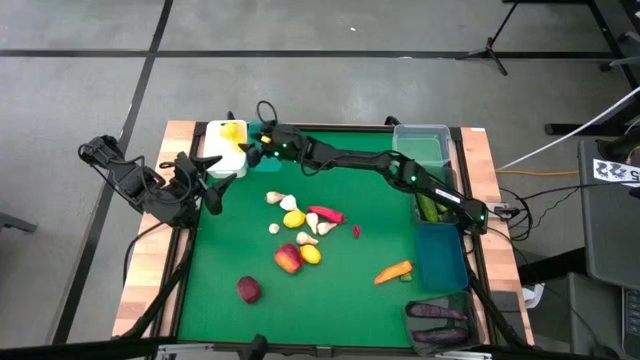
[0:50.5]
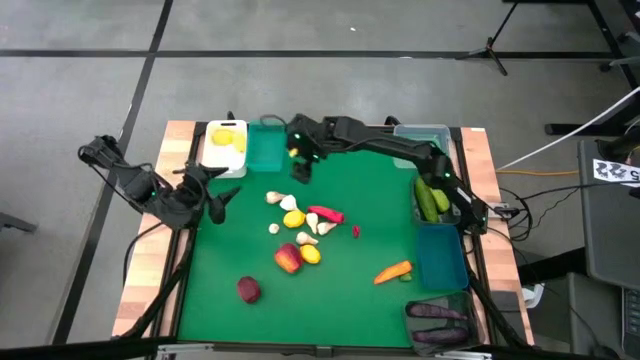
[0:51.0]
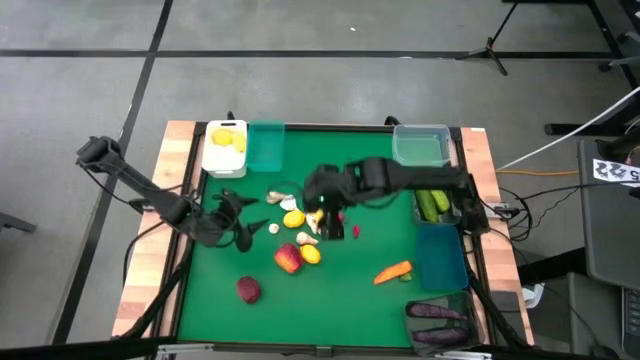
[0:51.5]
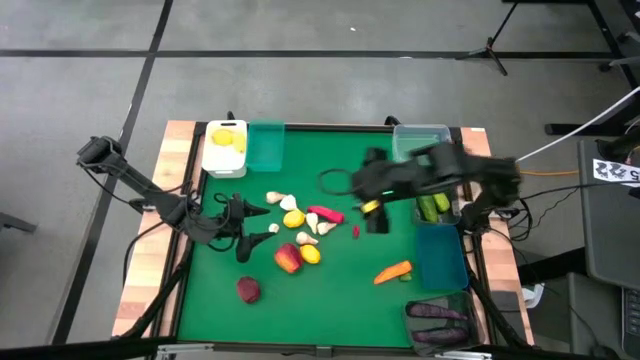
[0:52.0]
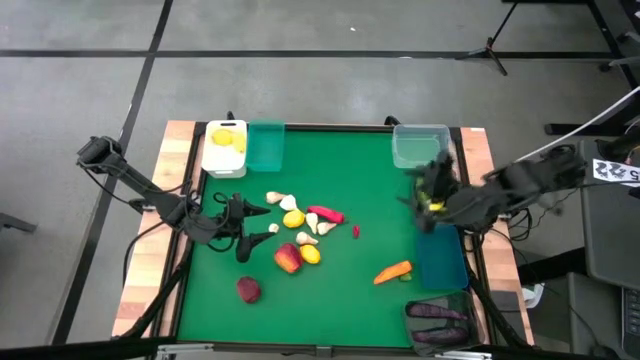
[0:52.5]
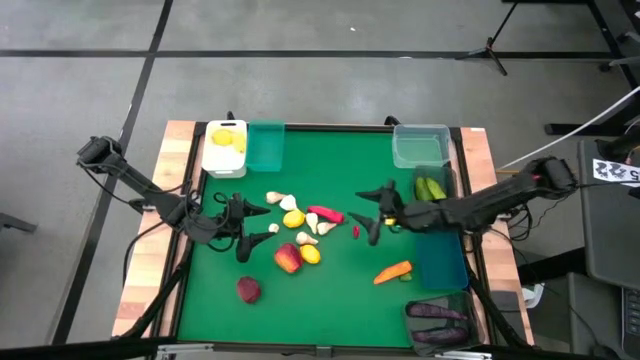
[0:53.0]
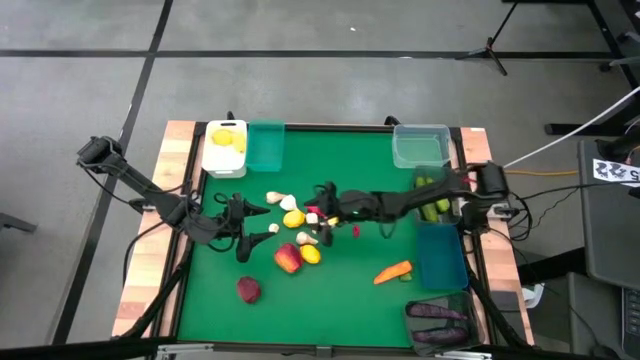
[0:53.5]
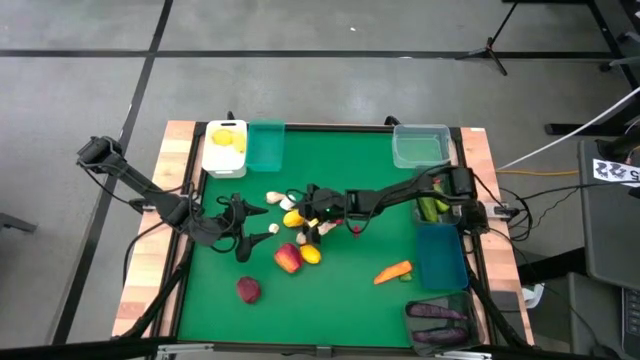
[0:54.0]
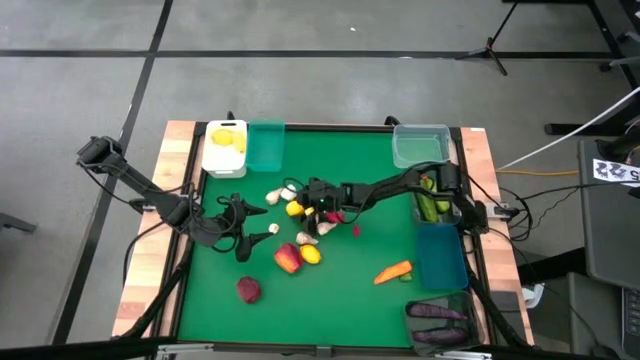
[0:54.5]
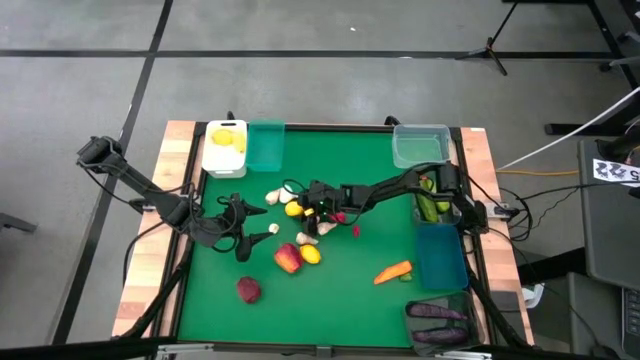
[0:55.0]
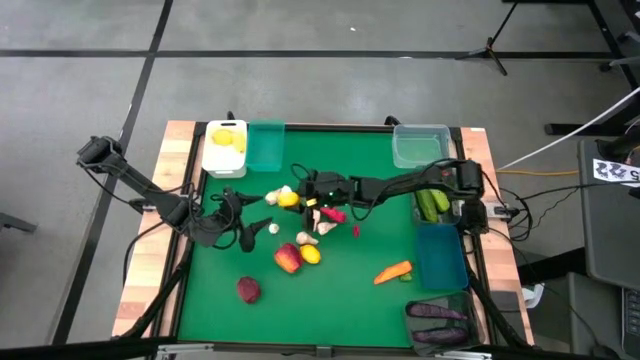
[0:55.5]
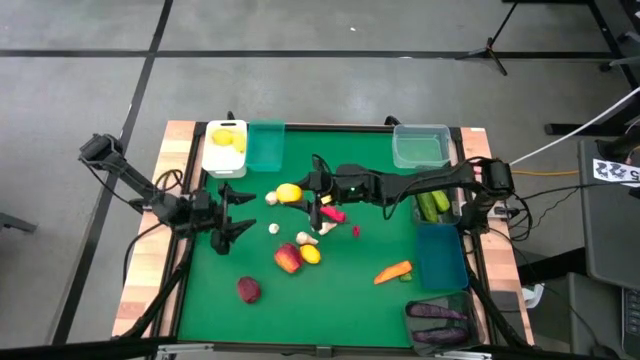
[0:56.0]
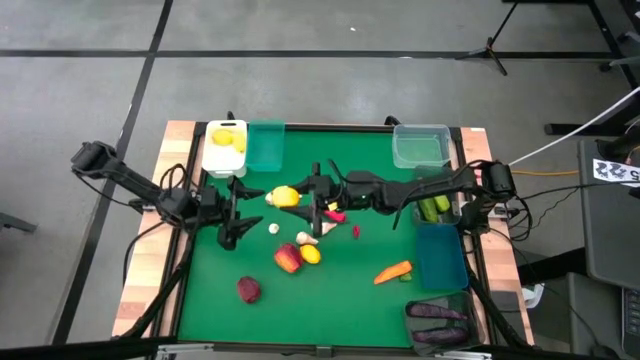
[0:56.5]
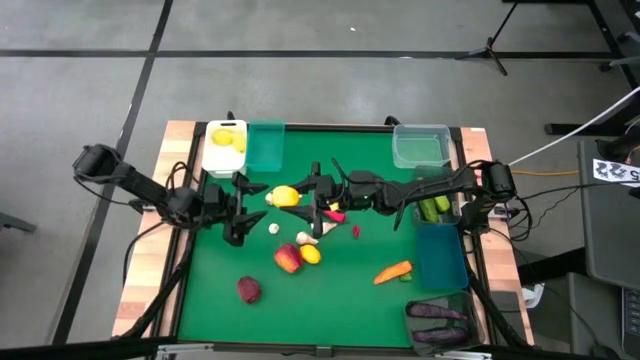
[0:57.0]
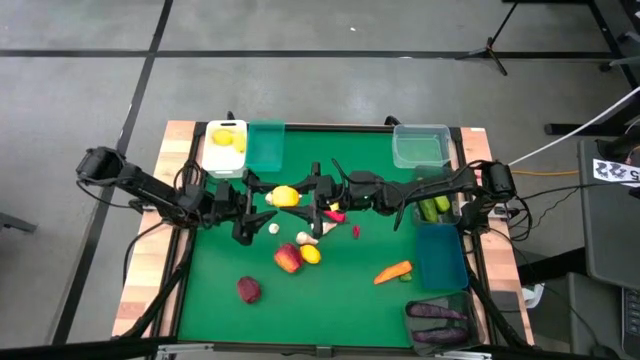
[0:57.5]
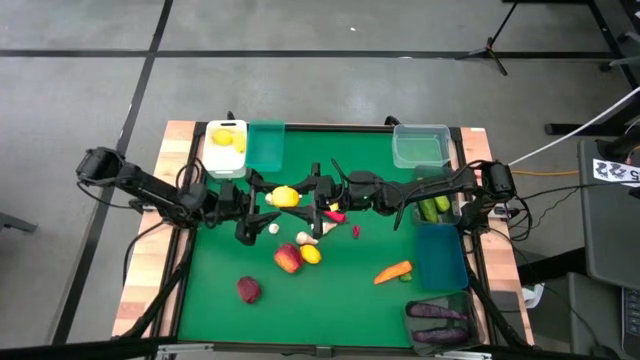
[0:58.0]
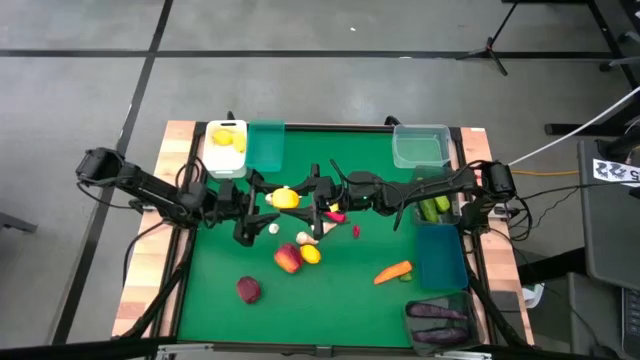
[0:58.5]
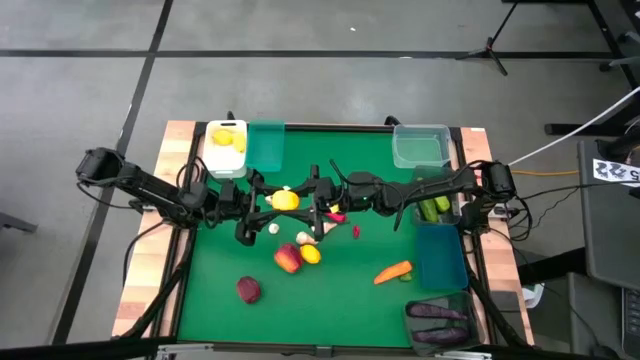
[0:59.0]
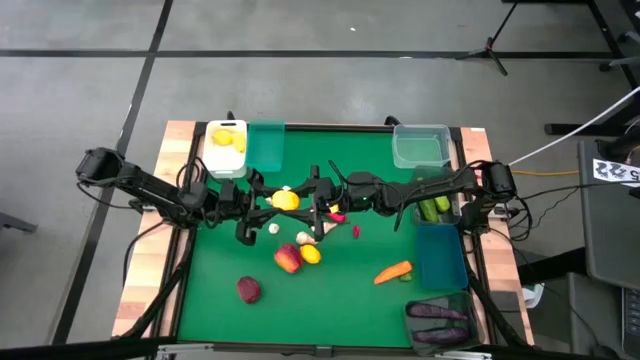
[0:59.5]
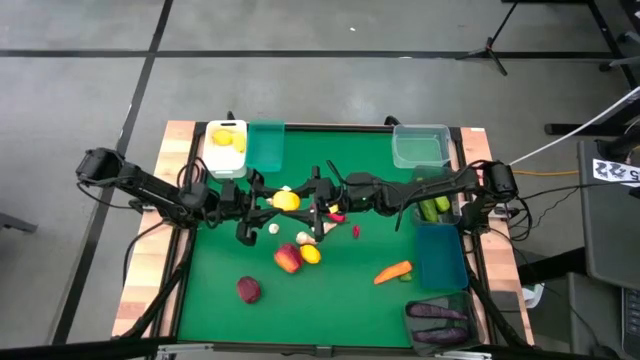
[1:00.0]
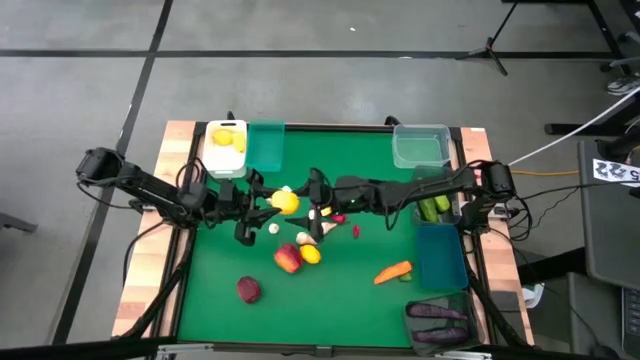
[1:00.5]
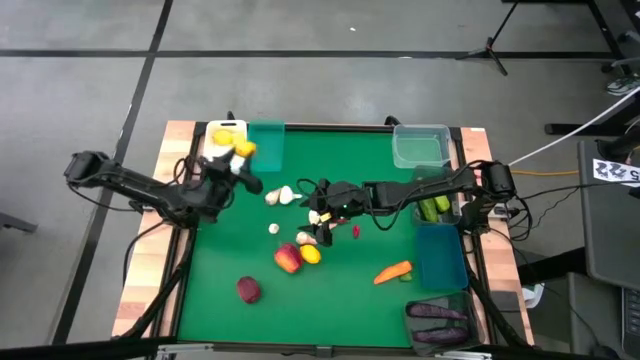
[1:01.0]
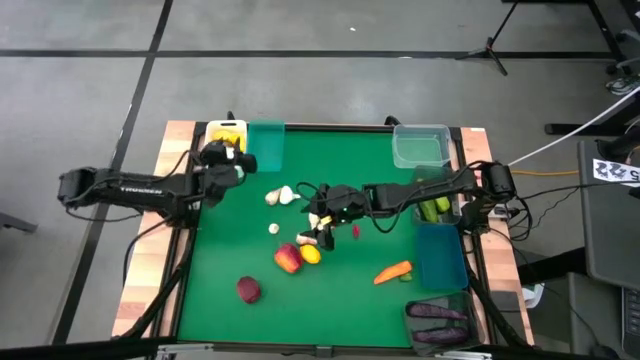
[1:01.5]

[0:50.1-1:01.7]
Task: Sort produce into baskets
Put the yellow lemon into the white bin

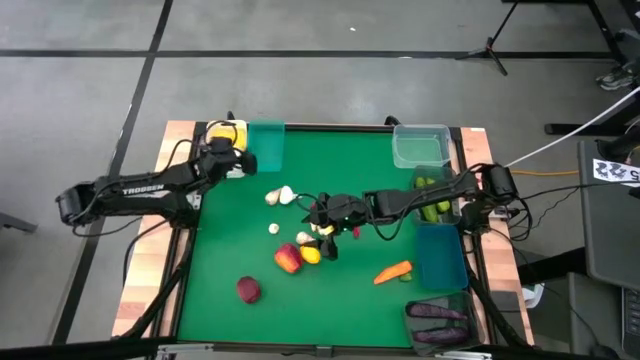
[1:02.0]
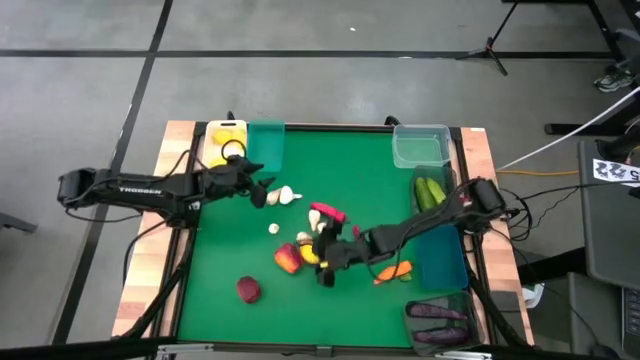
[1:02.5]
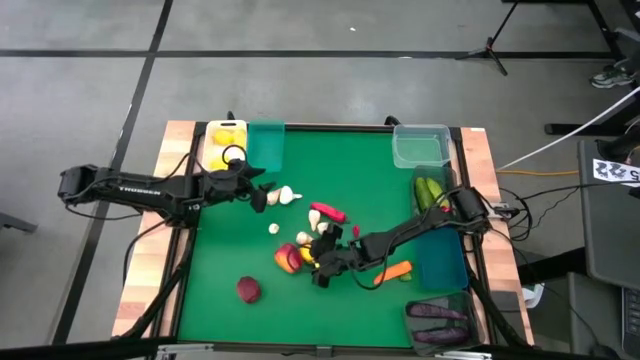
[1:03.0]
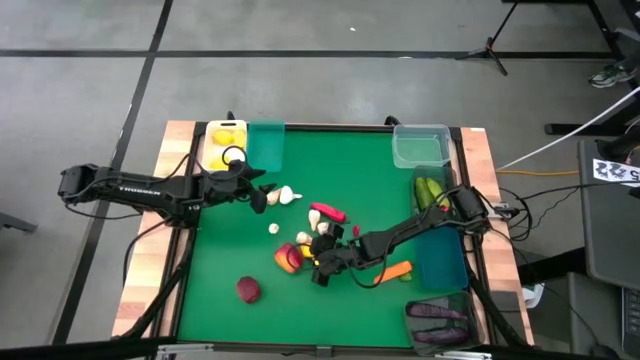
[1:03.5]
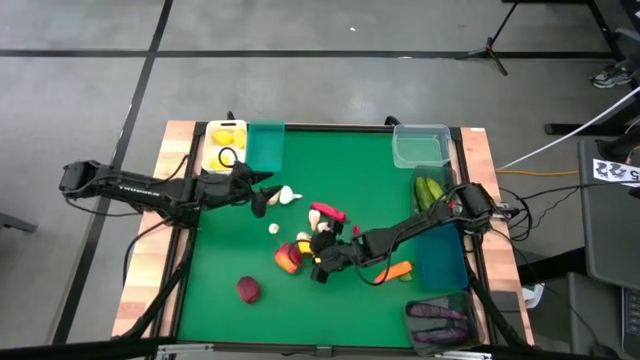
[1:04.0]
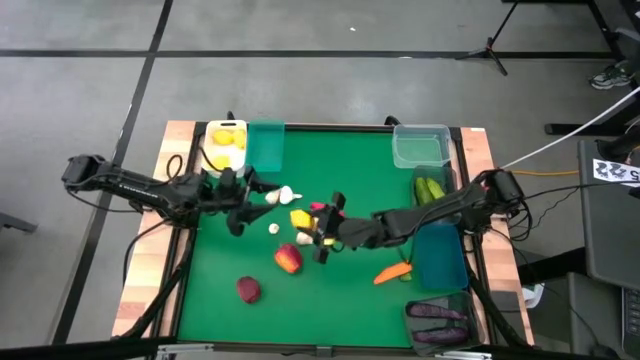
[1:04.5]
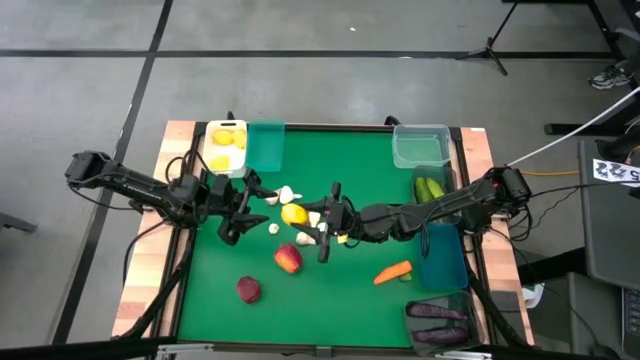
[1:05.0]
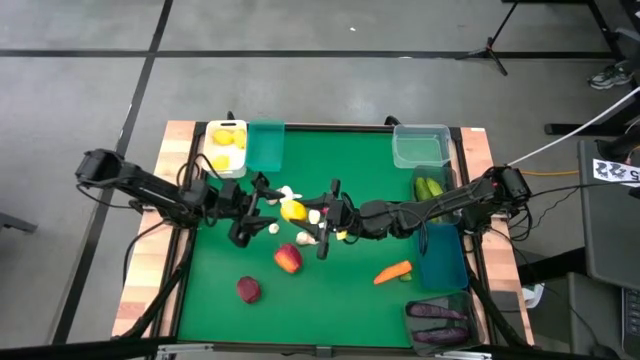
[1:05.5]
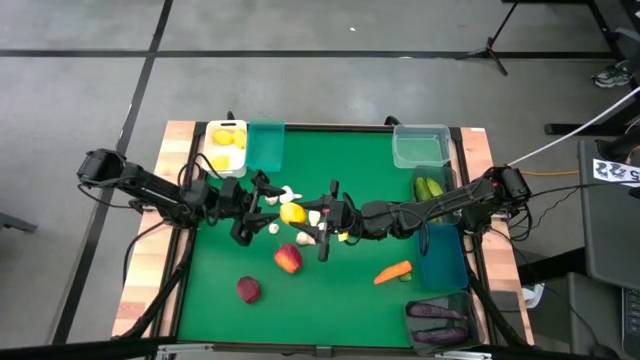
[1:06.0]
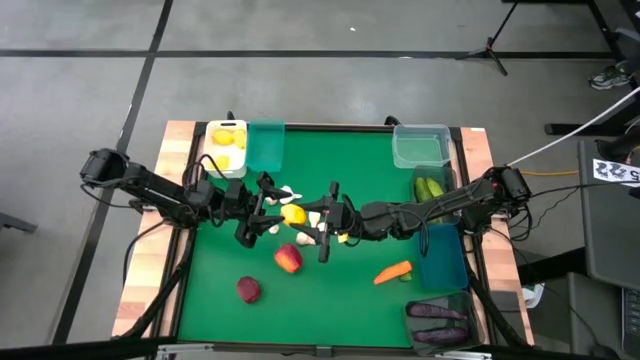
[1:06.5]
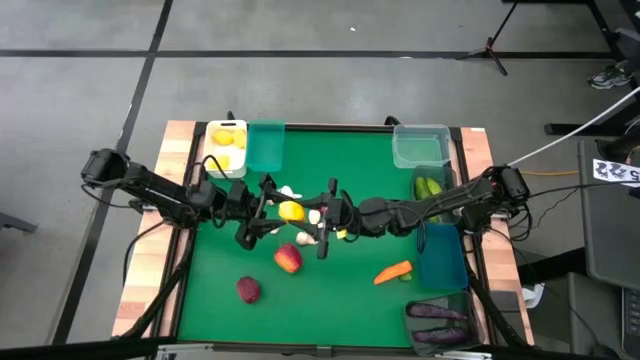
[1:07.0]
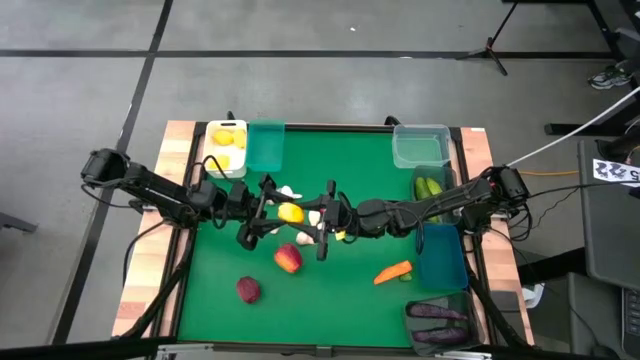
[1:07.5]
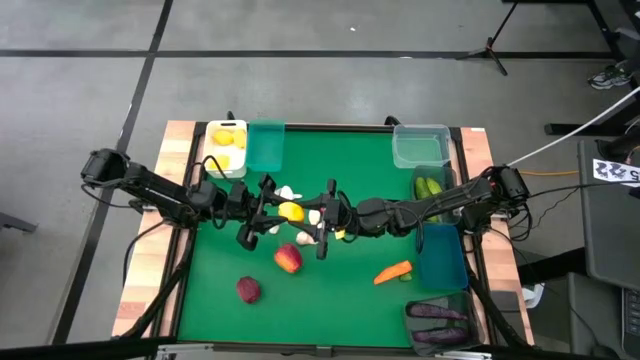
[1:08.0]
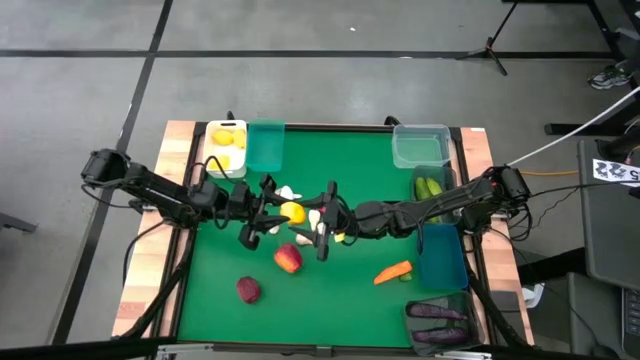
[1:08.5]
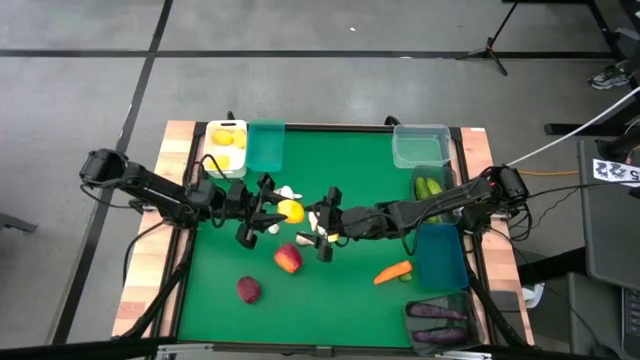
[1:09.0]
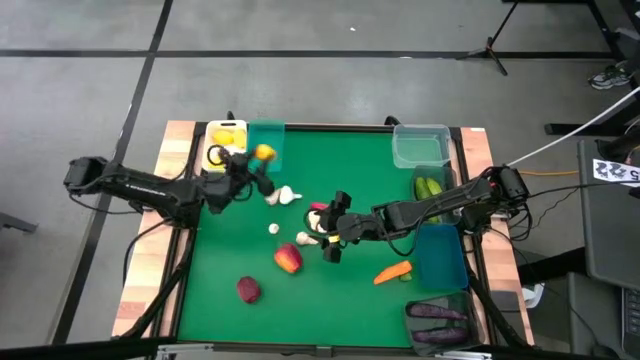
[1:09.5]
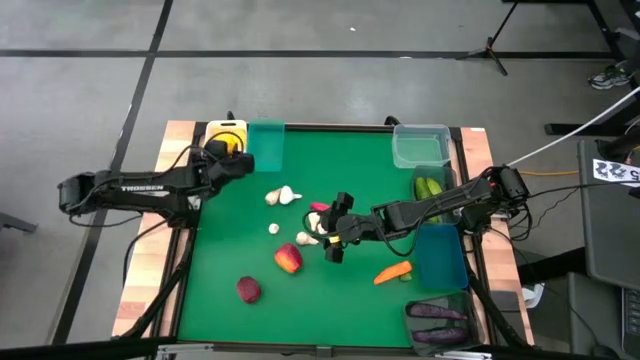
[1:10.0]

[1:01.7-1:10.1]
Put the yellow lemon into the white bin

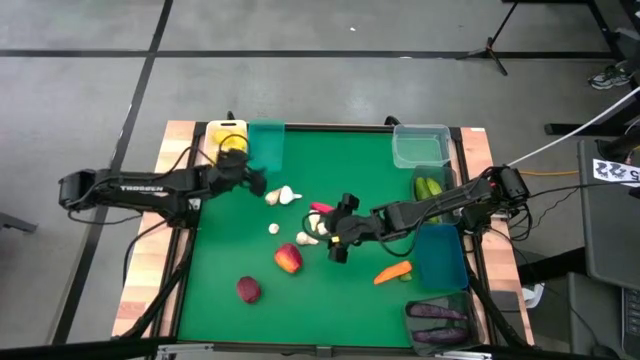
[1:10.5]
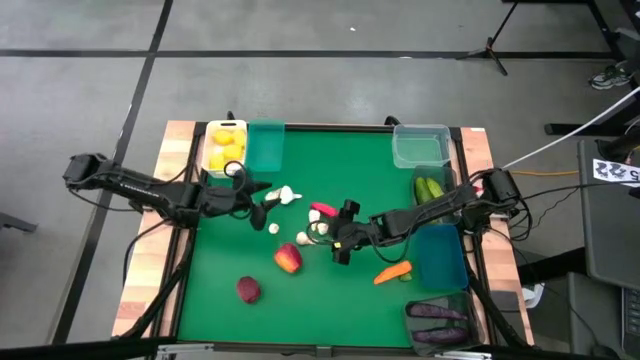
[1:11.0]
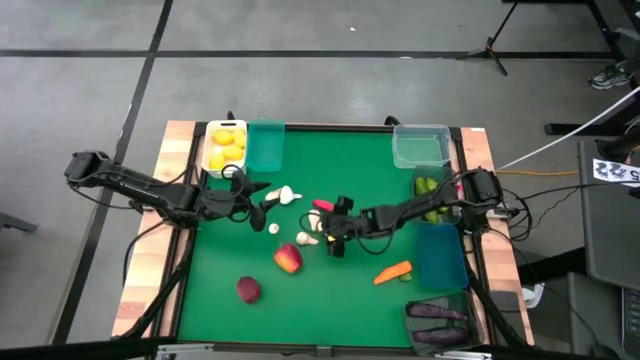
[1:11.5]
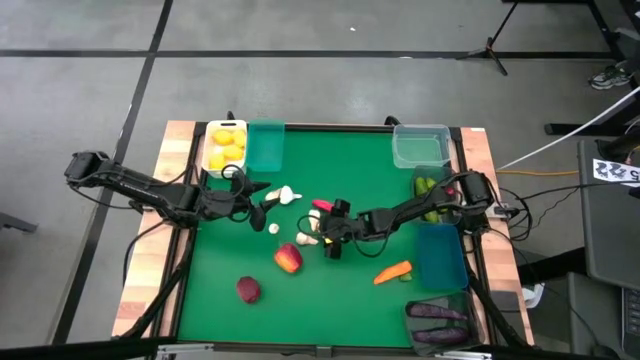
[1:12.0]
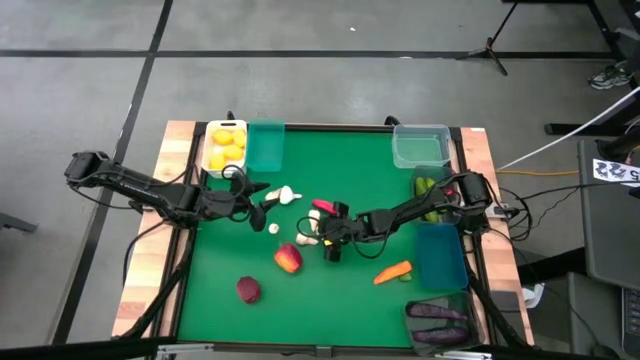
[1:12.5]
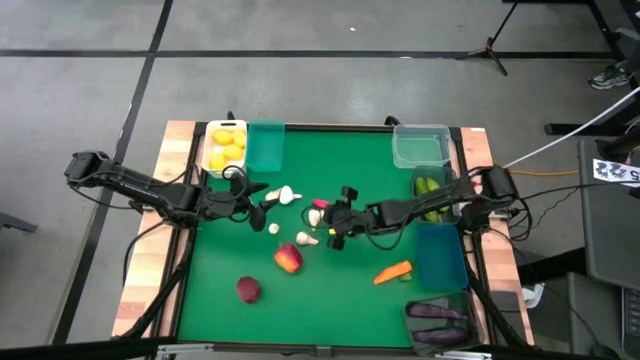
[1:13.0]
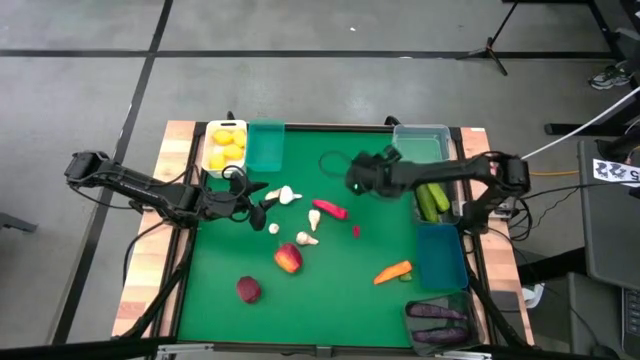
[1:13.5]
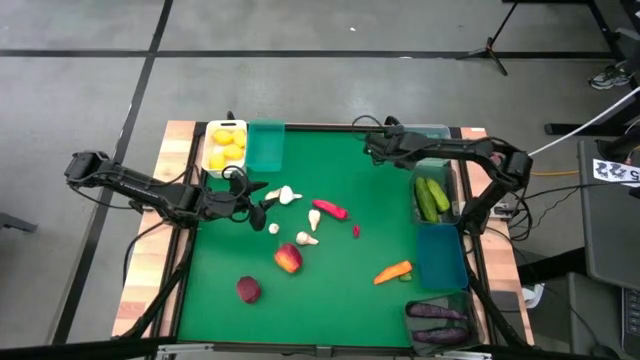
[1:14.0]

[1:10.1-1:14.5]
Put the white garlic into the transparent bin
